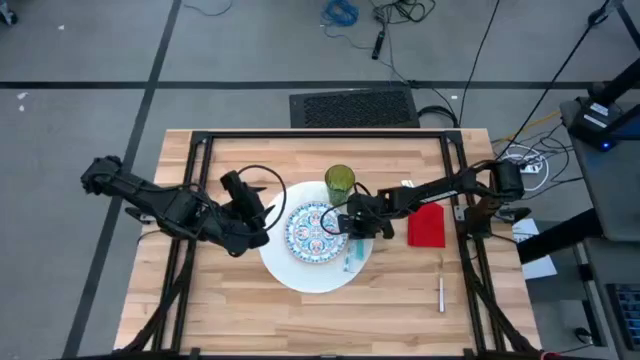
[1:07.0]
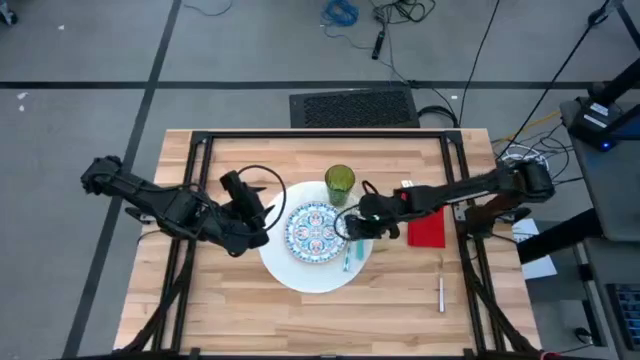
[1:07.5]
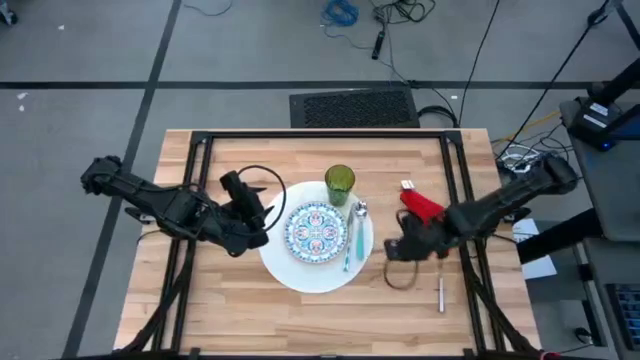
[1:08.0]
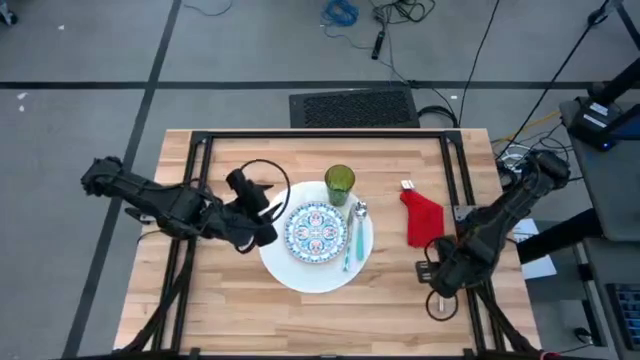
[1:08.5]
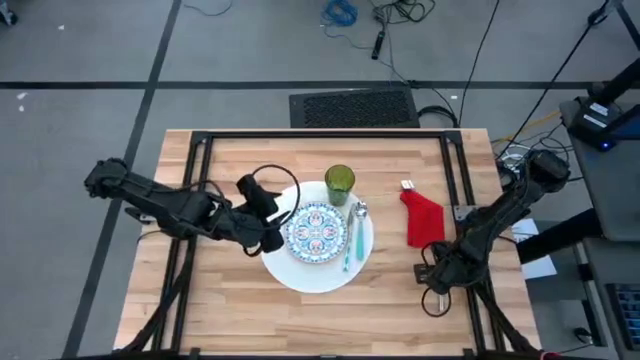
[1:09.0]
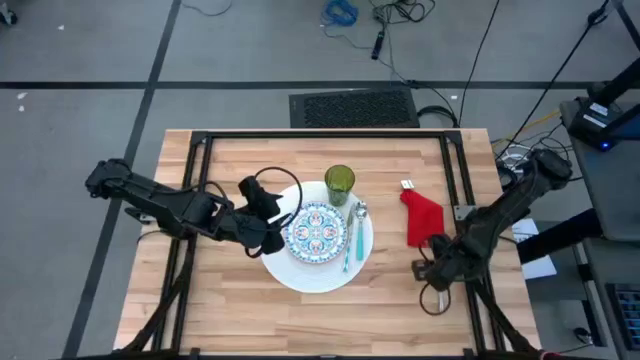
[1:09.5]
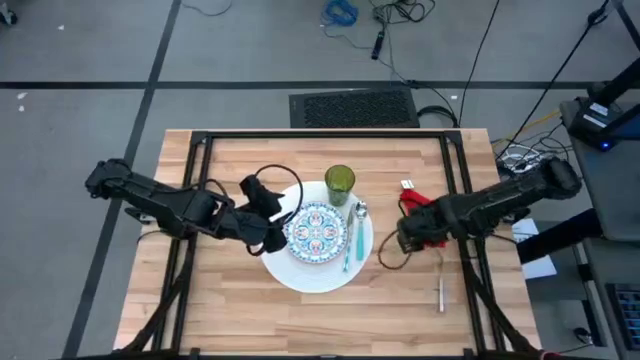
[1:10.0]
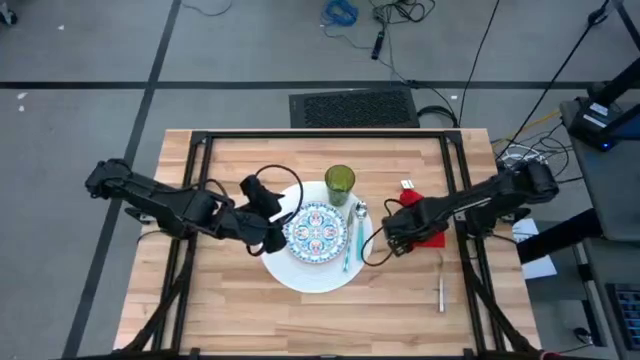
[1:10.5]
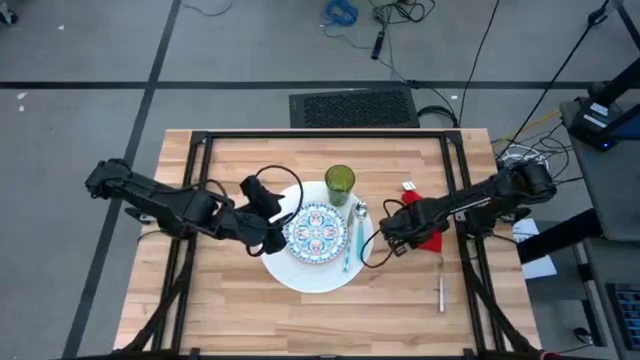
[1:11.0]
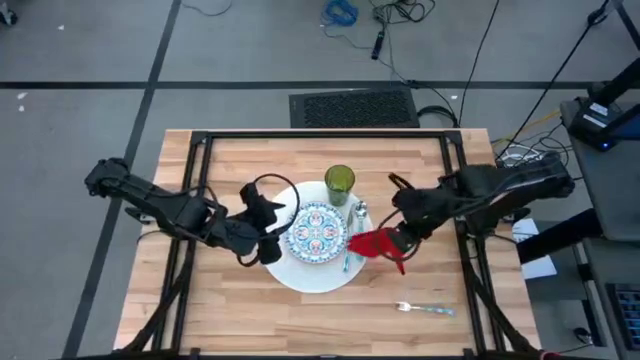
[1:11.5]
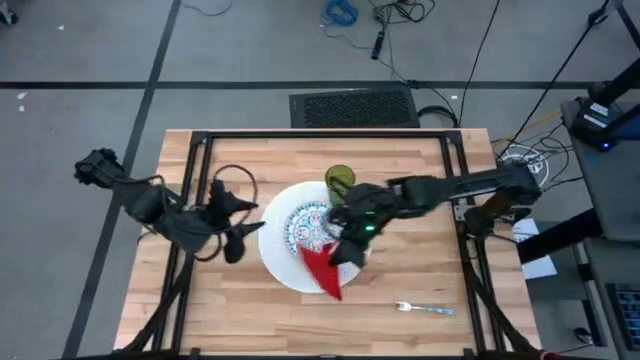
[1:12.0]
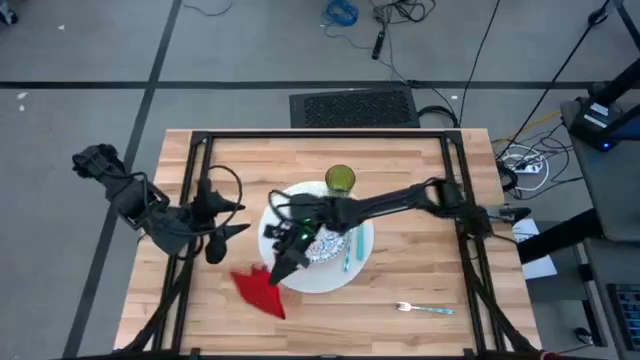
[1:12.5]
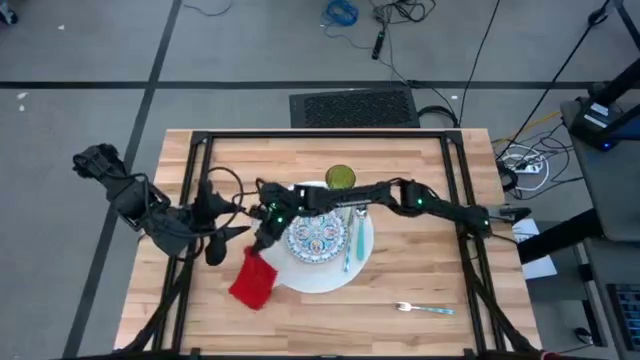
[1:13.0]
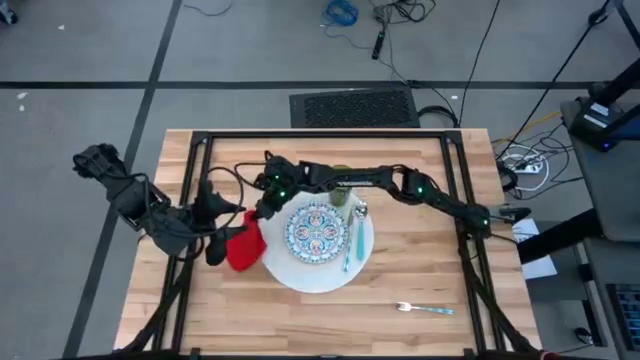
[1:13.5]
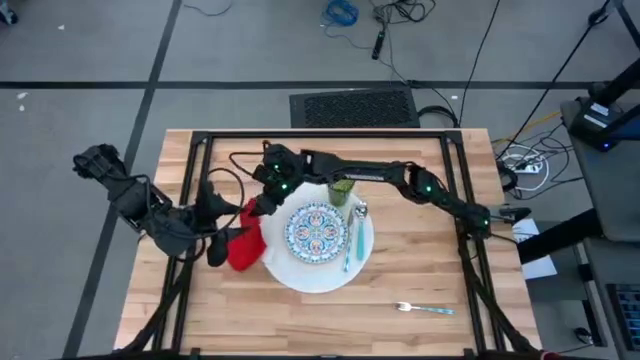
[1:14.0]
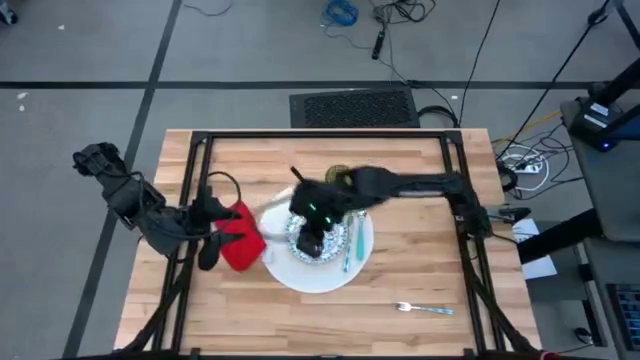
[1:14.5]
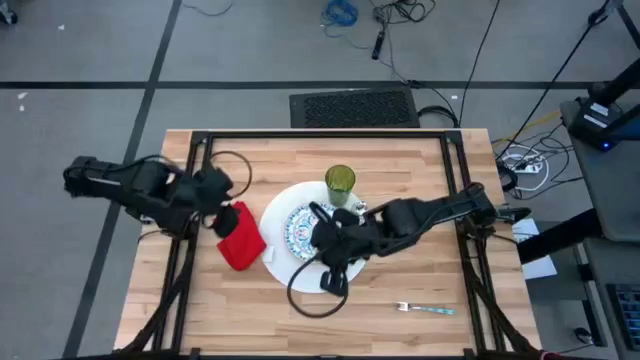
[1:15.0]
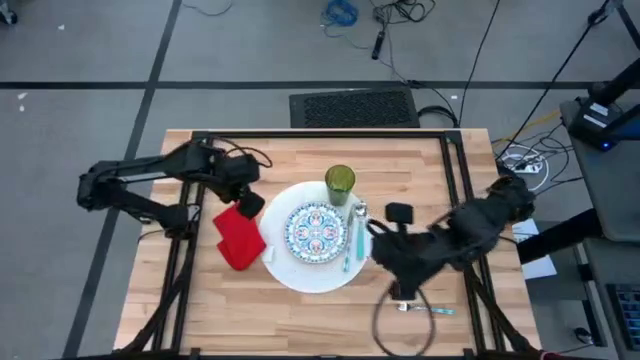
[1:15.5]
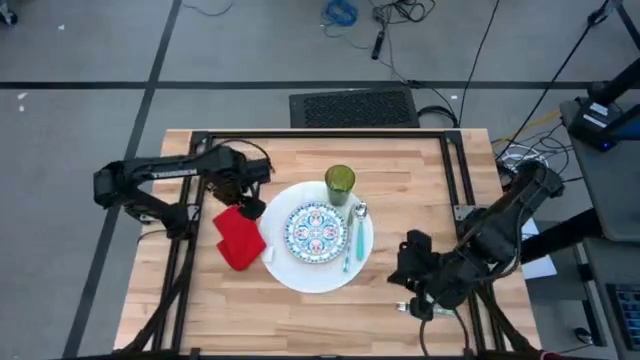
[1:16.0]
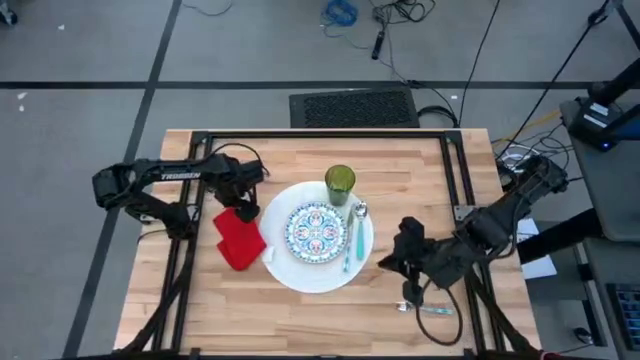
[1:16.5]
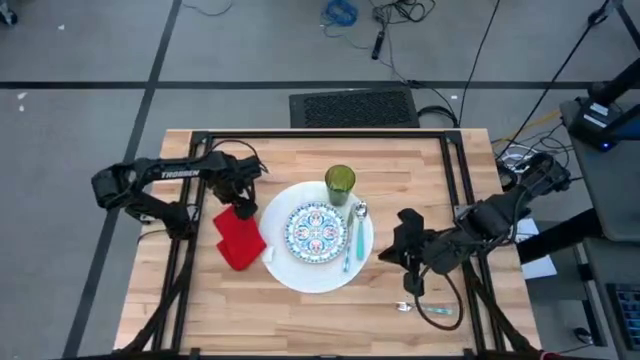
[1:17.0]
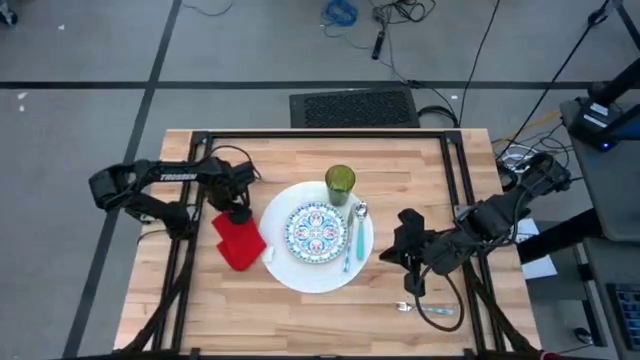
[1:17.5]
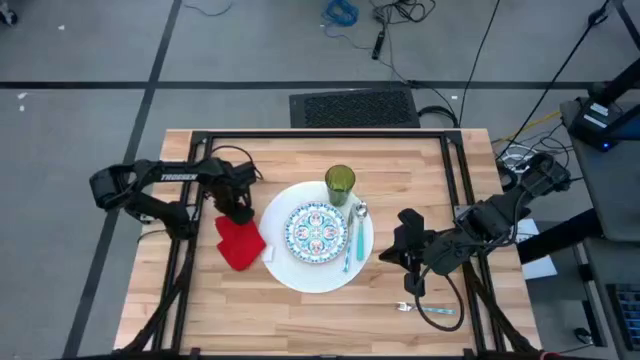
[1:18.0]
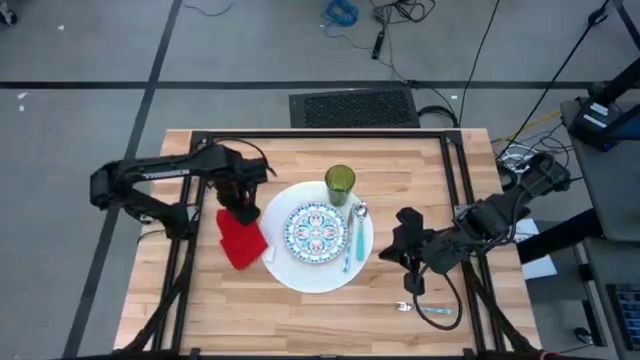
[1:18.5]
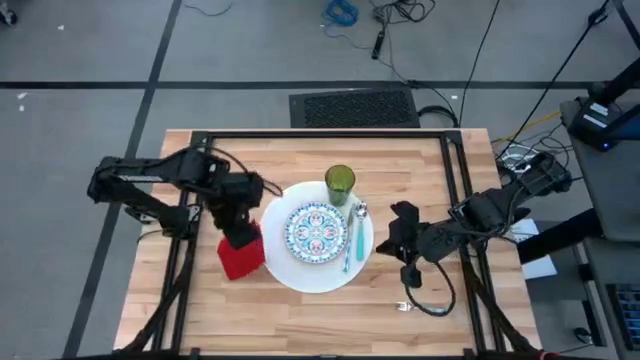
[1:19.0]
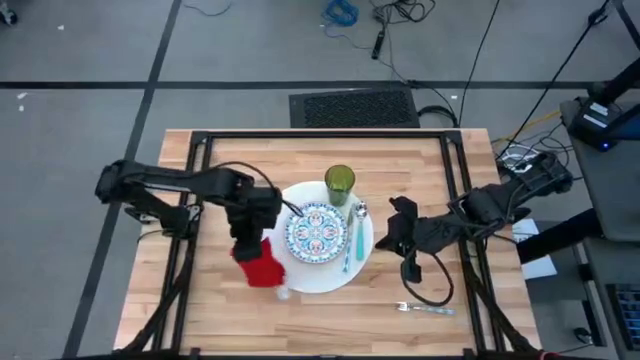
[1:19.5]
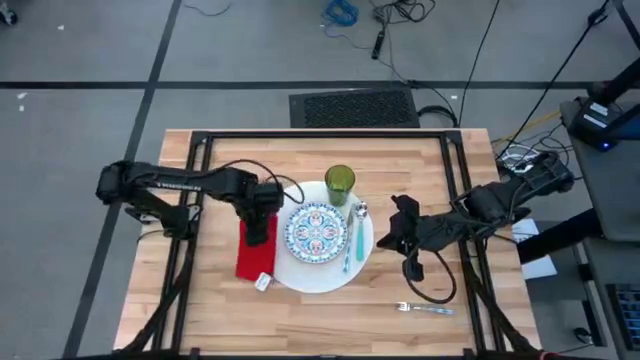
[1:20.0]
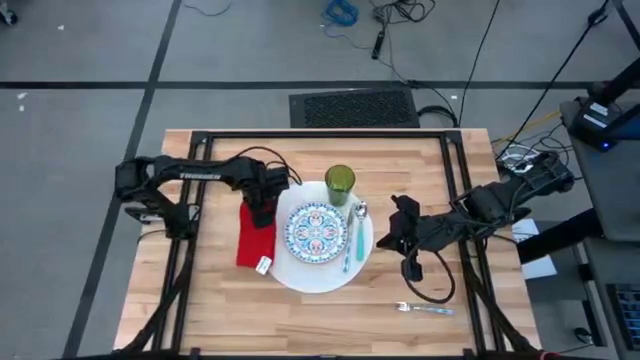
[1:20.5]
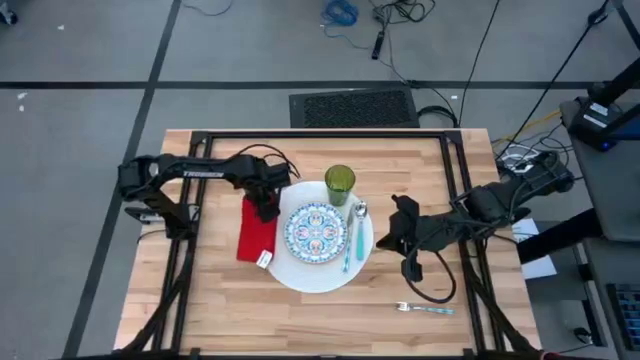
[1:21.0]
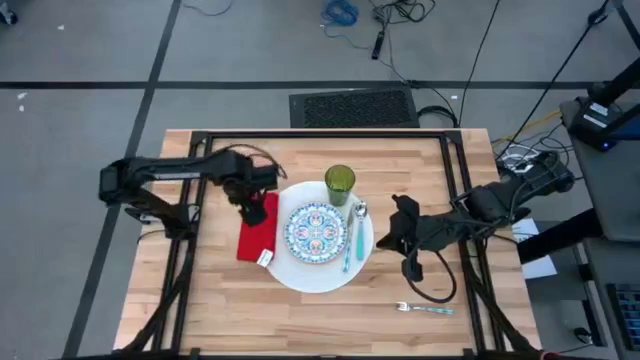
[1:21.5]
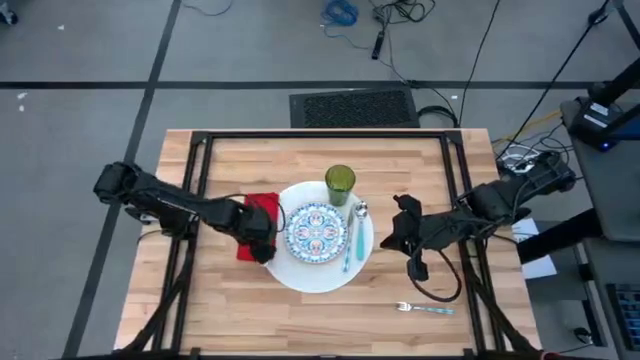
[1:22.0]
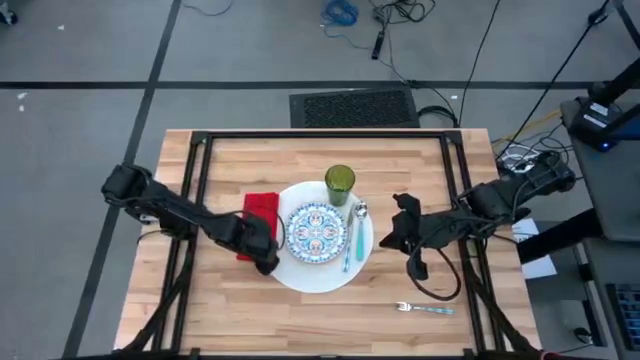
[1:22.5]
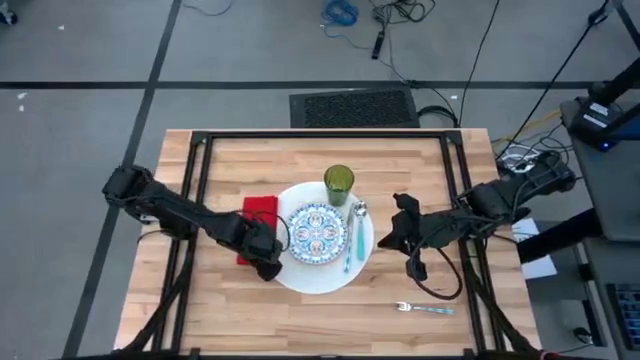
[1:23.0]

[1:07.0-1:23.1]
Task: Set table place
Put the red napkin to the left side of the plate on the white table placemat

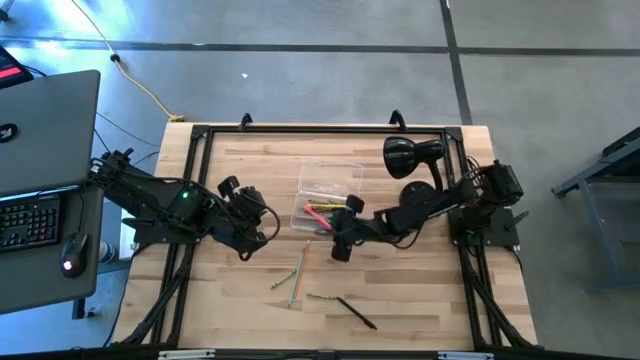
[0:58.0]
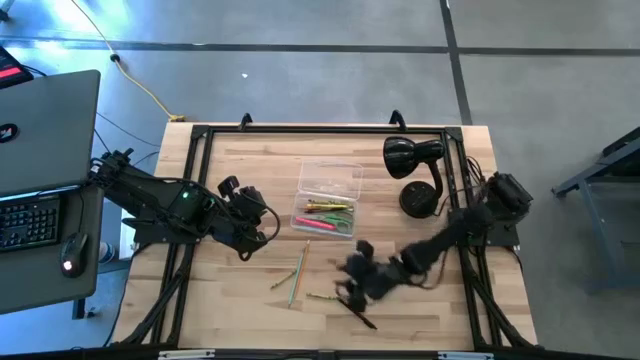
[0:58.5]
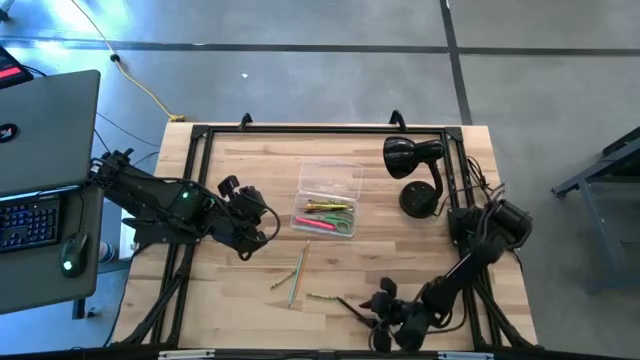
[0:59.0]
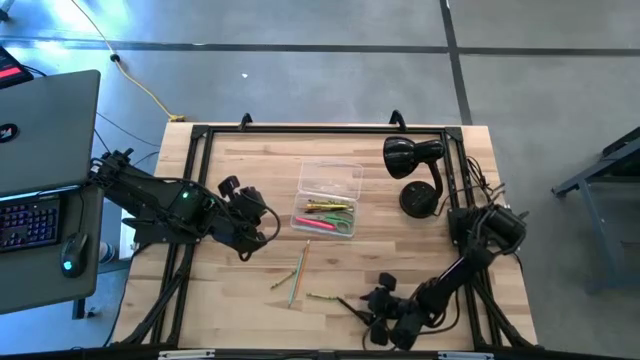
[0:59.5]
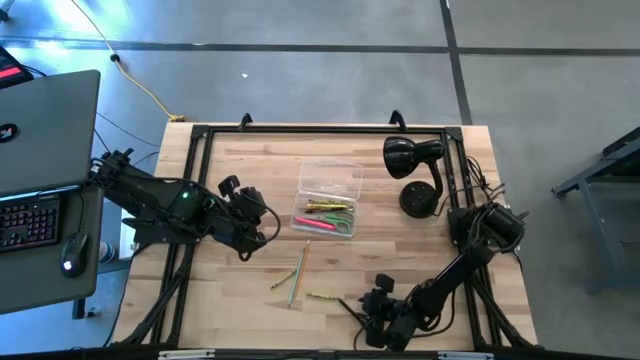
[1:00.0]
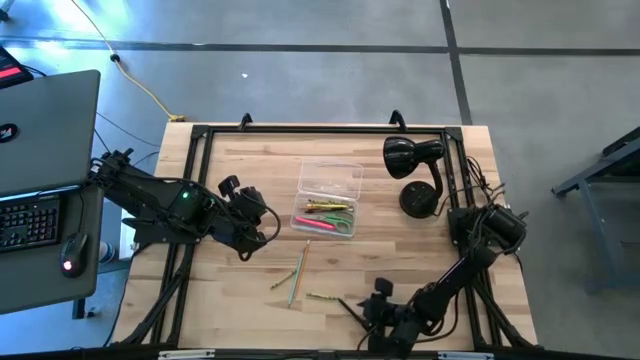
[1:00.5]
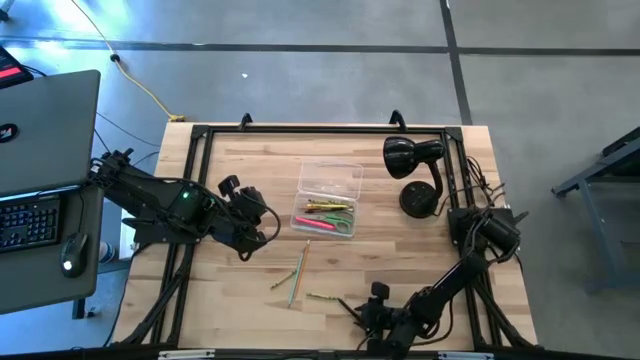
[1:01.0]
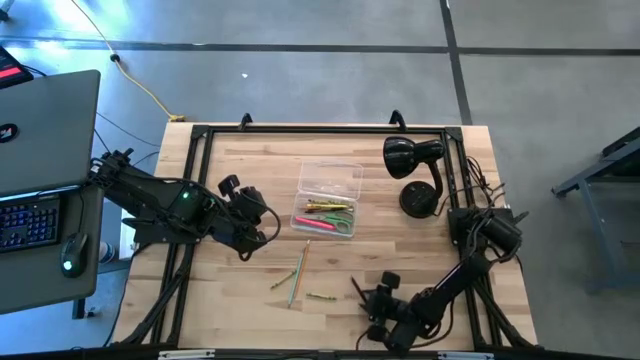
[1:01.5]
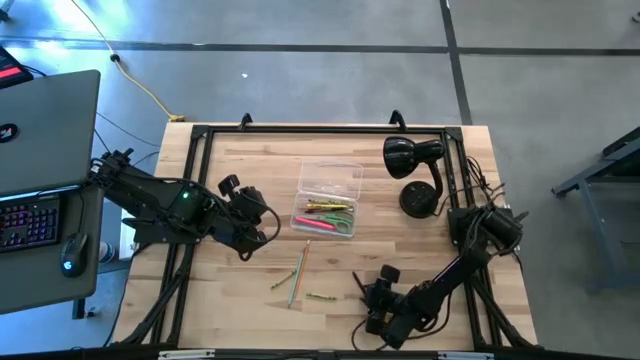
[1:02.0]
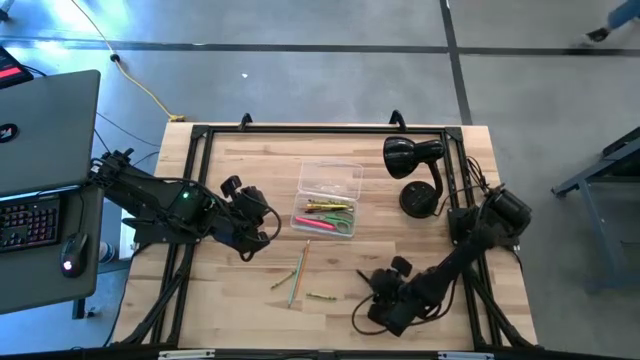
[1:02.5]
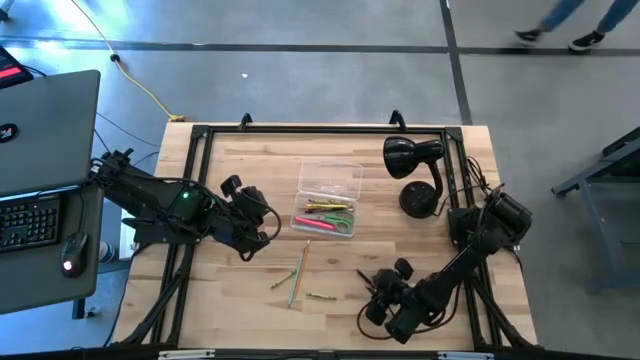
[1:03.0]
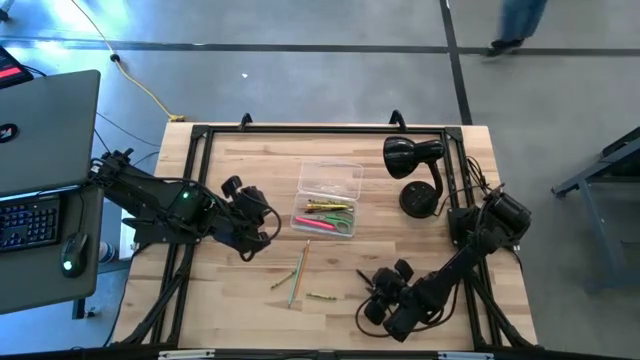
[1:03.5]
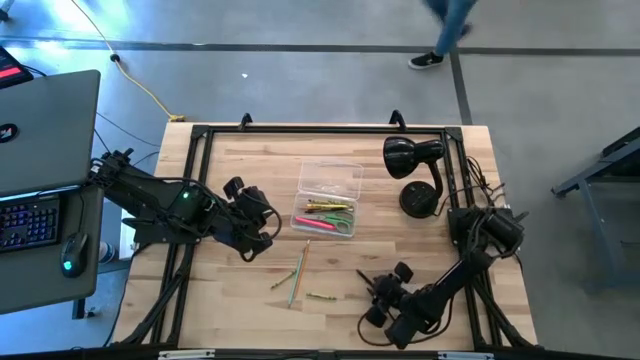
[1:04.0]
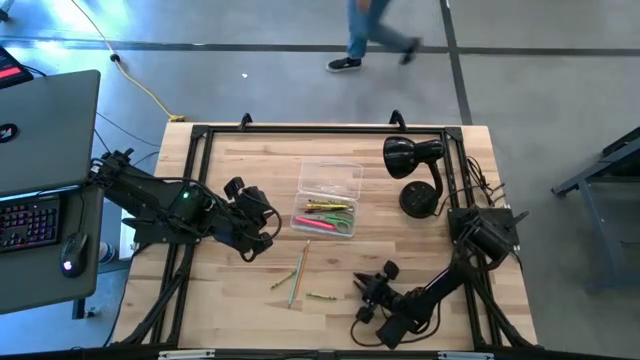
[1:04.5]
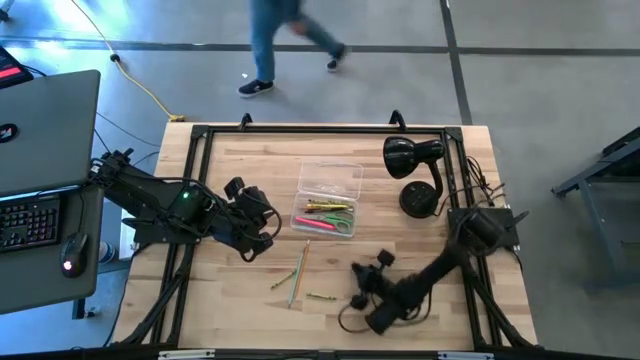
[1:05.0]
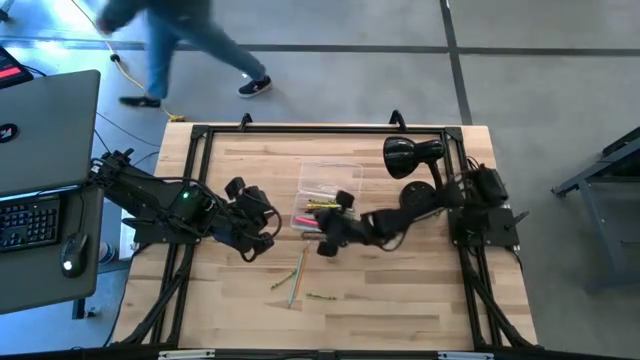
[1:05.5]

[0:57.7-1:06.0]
Task: Pick & place school supplies into a supply box
Put the black pen into the transparent supply box
